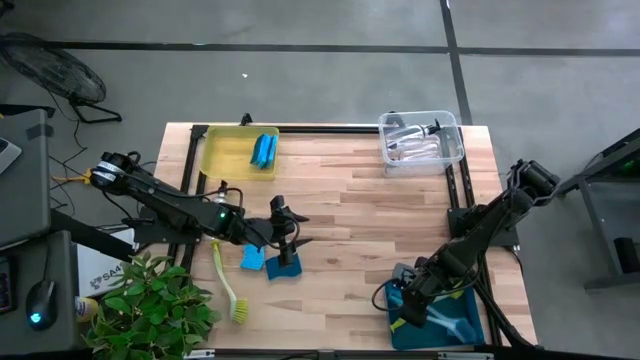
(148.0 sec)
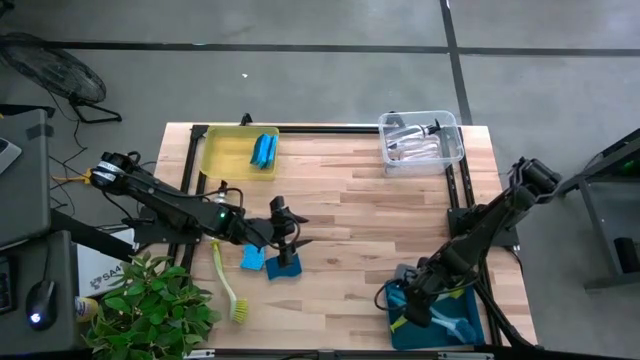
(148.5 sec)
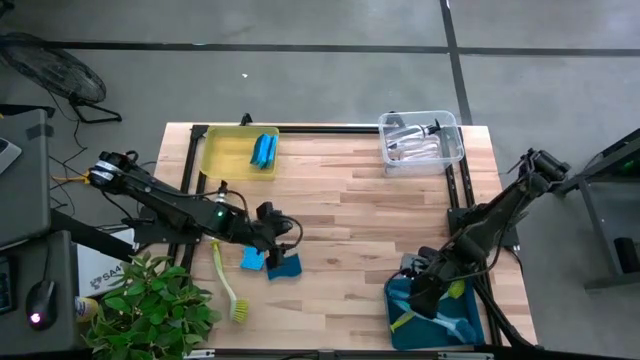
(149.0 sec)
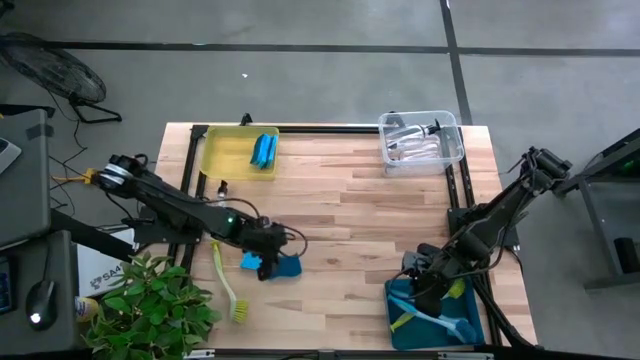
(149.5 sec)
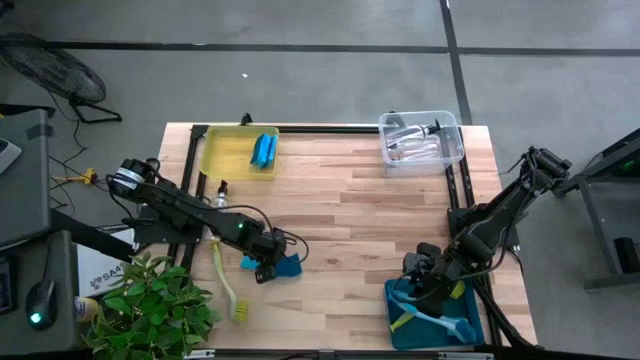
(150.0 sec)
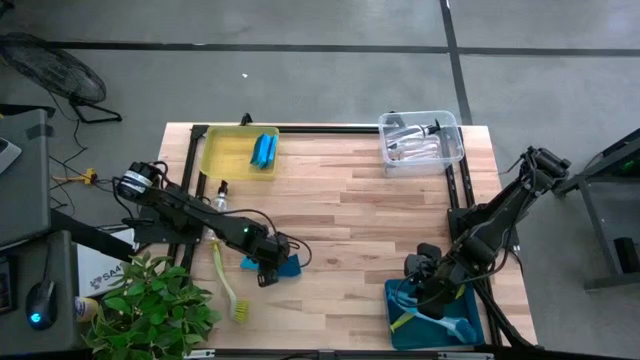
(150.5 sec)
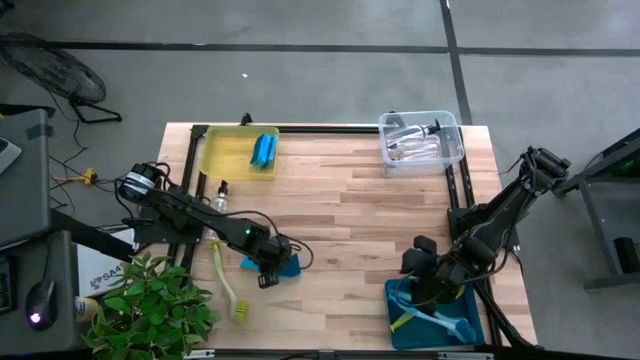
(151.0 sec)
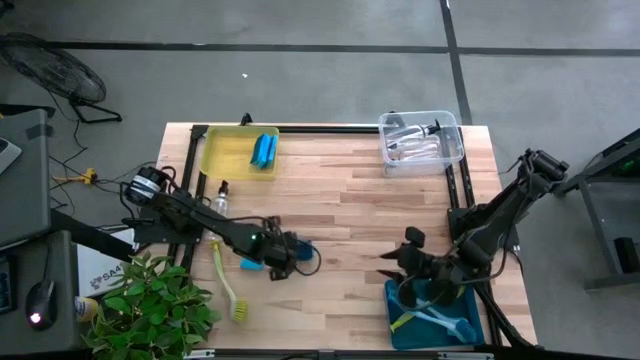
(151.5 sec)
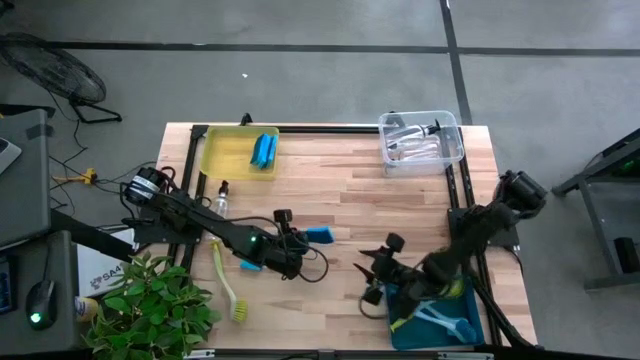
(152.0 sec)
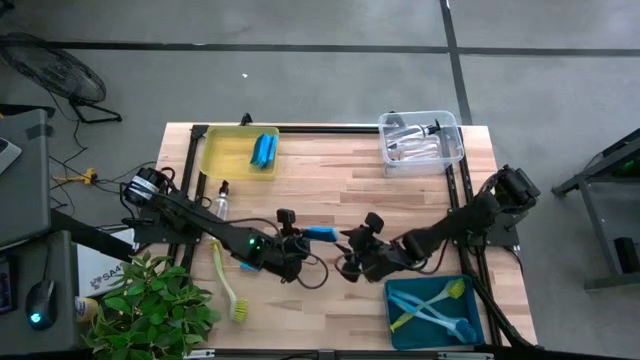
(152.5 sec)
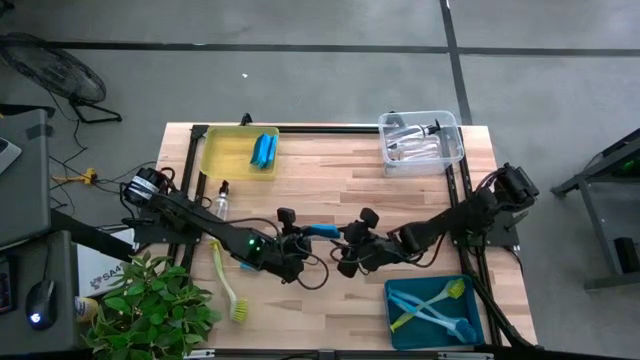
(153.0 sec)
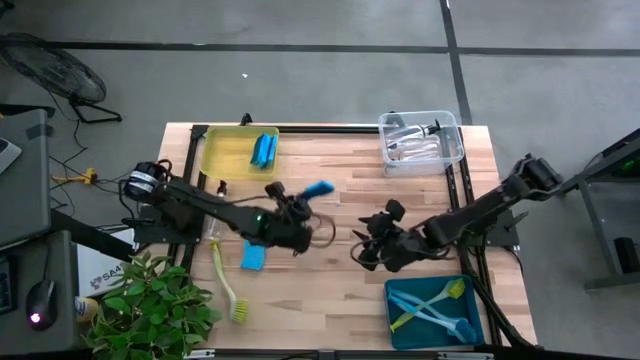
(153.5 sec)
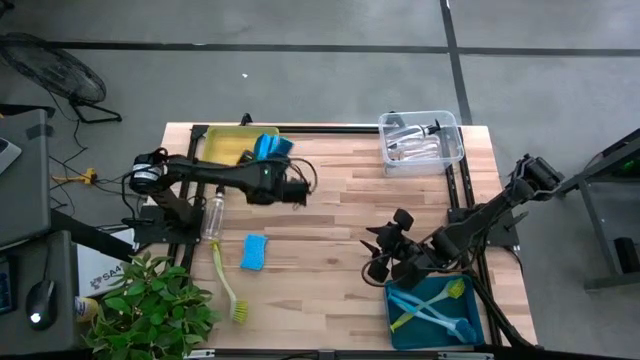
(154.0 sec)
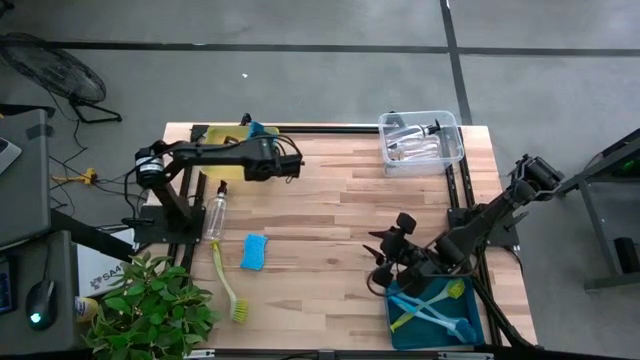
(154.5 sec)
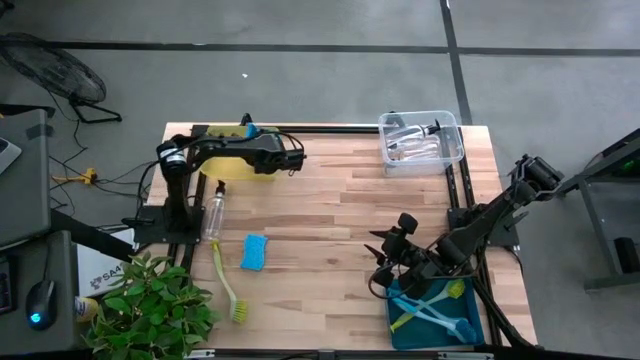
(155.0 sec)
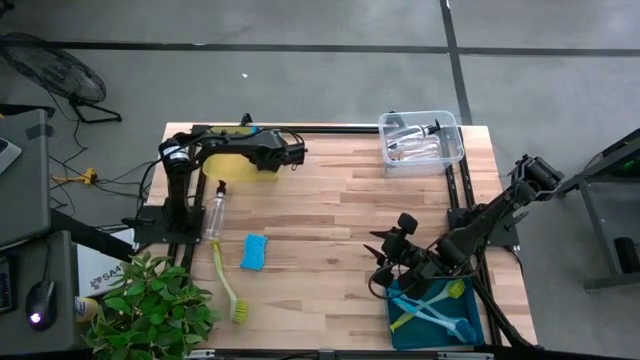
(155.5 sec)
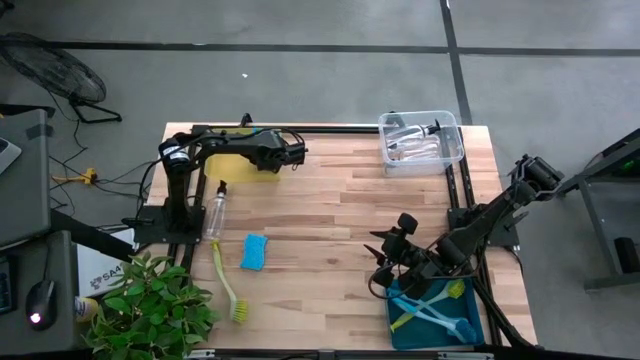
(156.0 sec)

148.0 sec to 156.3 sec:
Task: Pick & Place Kitchen Sink Supplies
Put the blue sponge into the yellow bin

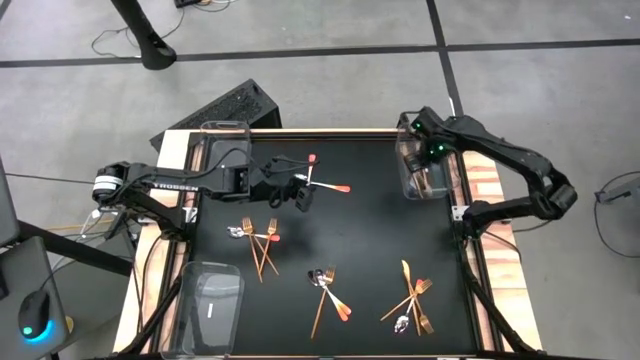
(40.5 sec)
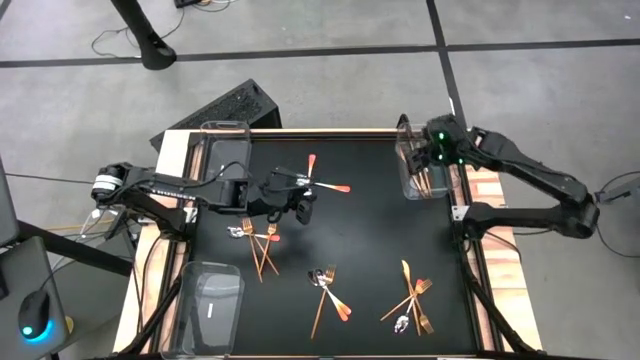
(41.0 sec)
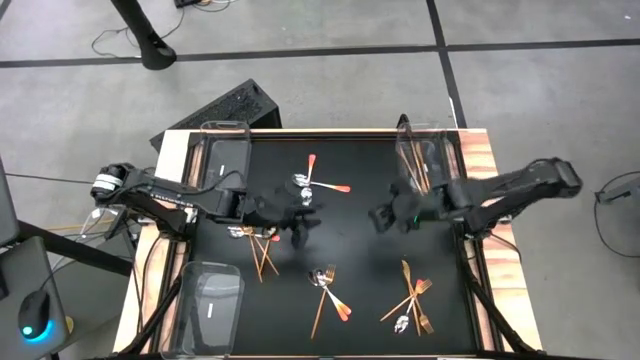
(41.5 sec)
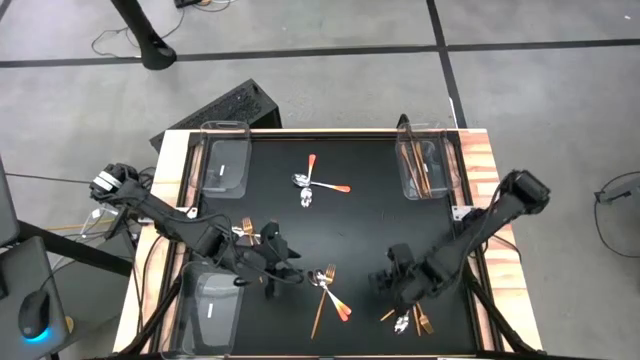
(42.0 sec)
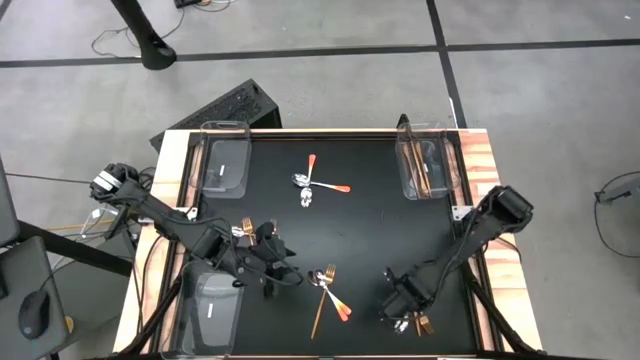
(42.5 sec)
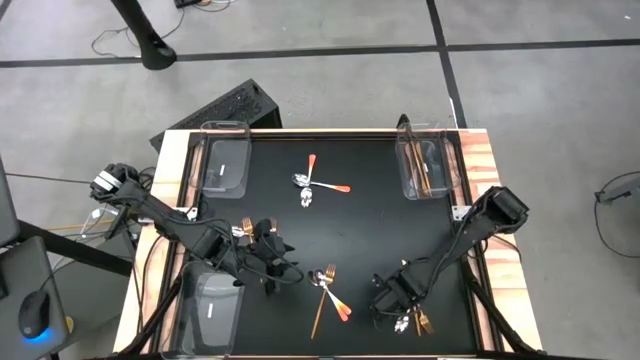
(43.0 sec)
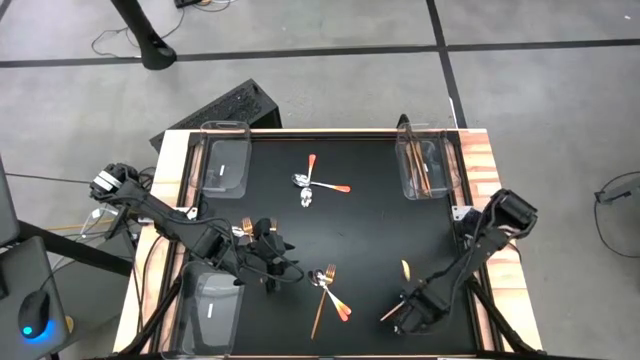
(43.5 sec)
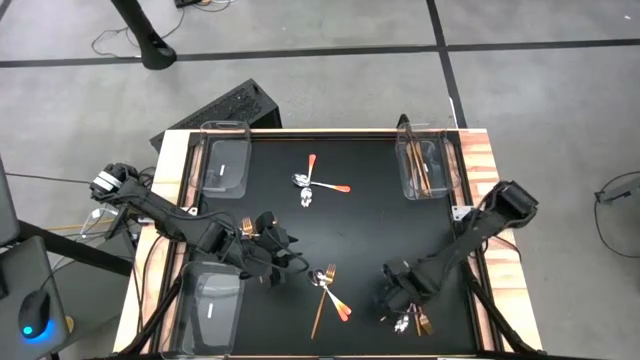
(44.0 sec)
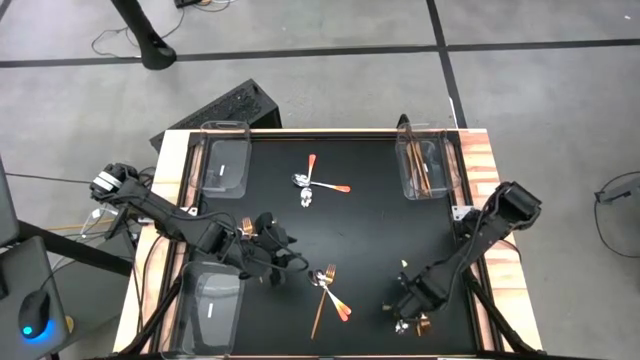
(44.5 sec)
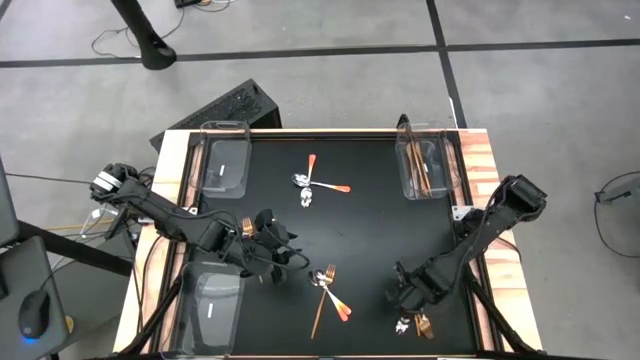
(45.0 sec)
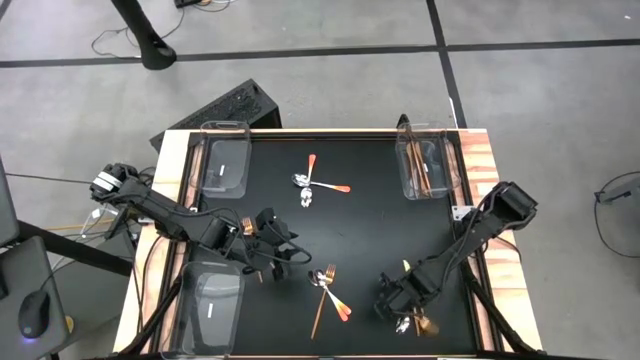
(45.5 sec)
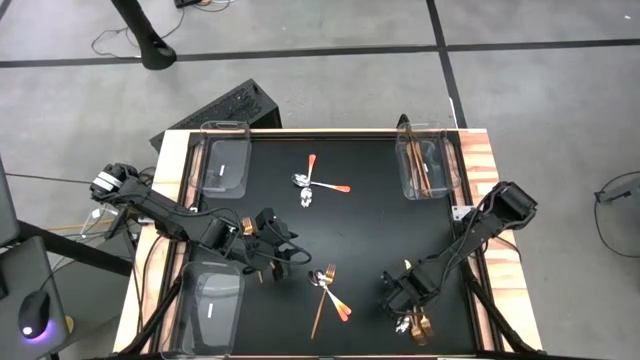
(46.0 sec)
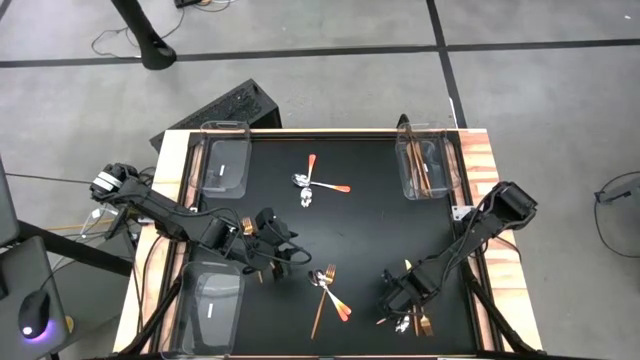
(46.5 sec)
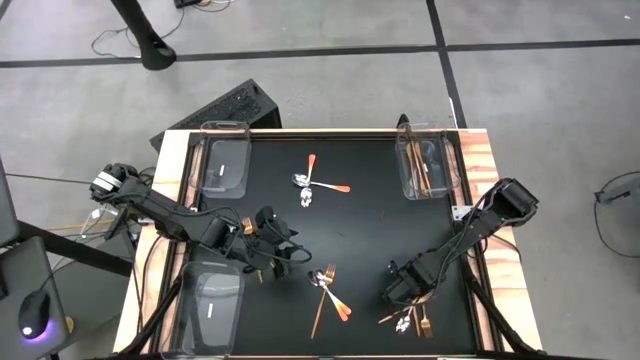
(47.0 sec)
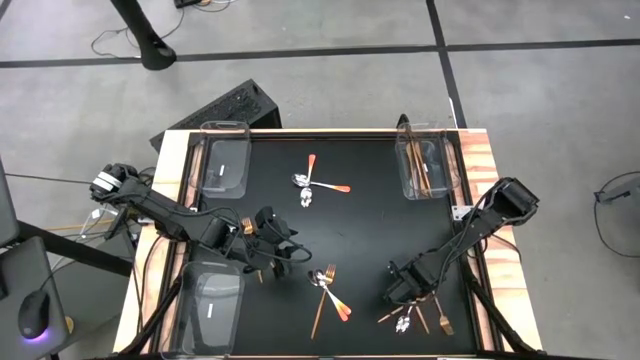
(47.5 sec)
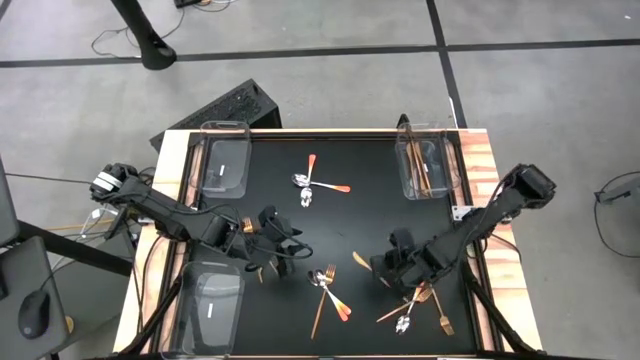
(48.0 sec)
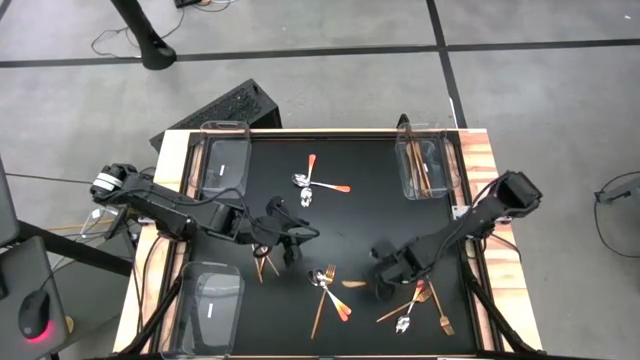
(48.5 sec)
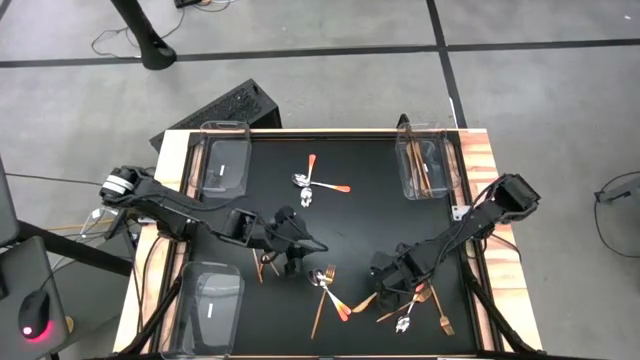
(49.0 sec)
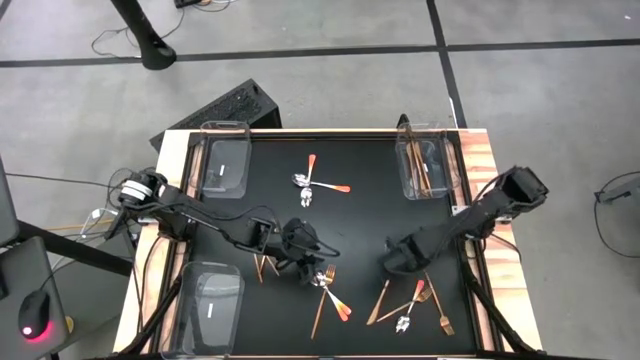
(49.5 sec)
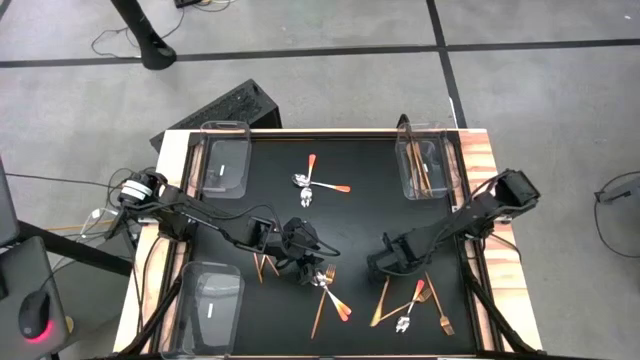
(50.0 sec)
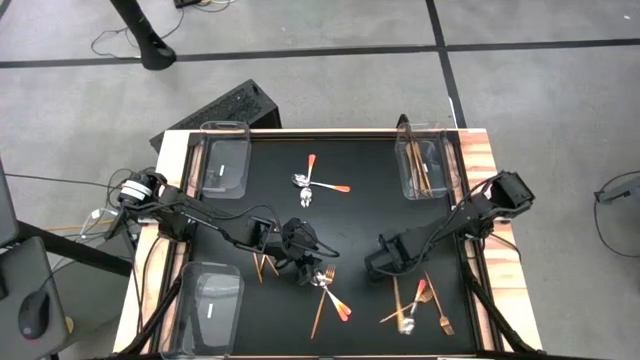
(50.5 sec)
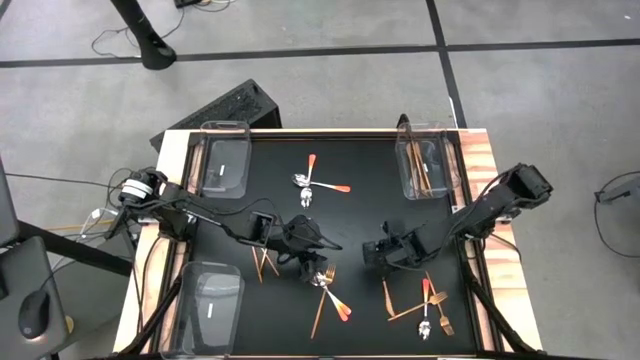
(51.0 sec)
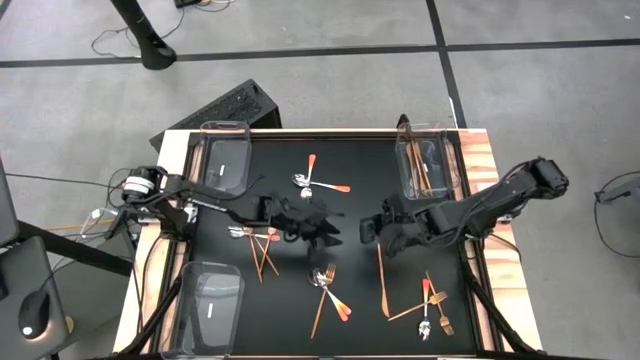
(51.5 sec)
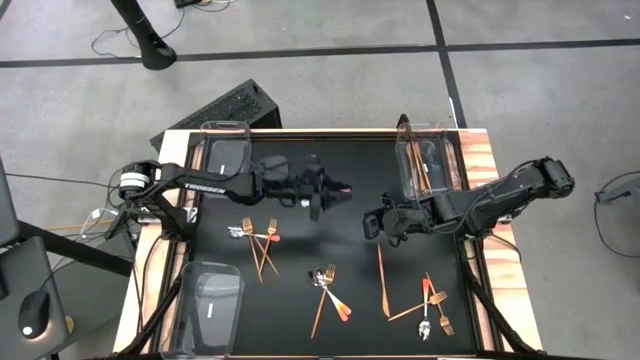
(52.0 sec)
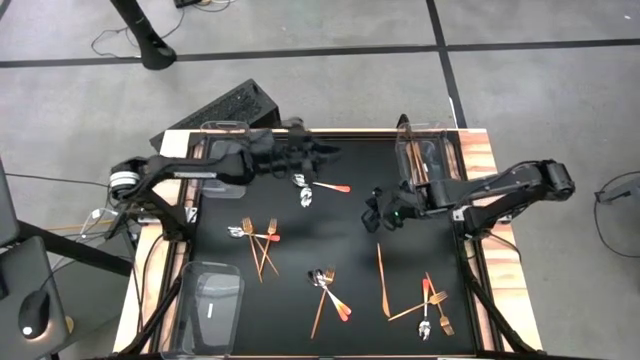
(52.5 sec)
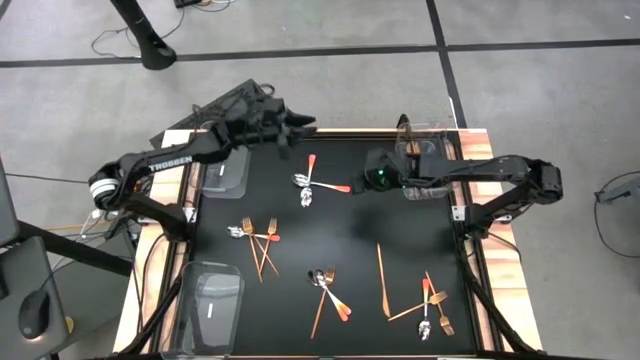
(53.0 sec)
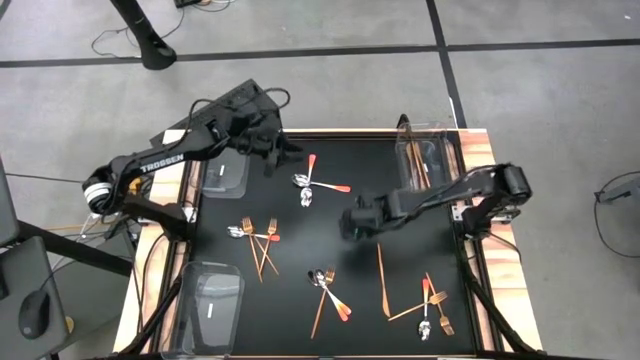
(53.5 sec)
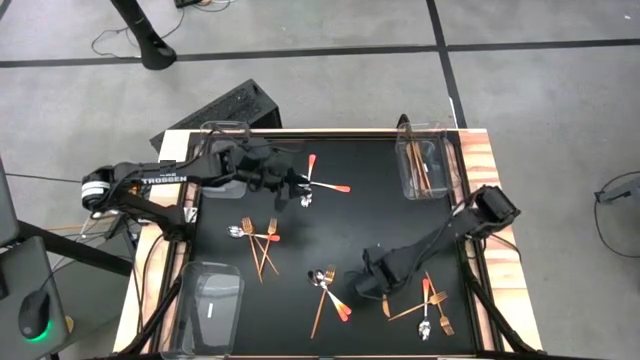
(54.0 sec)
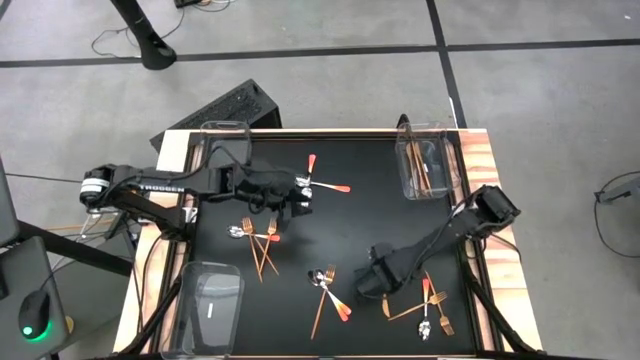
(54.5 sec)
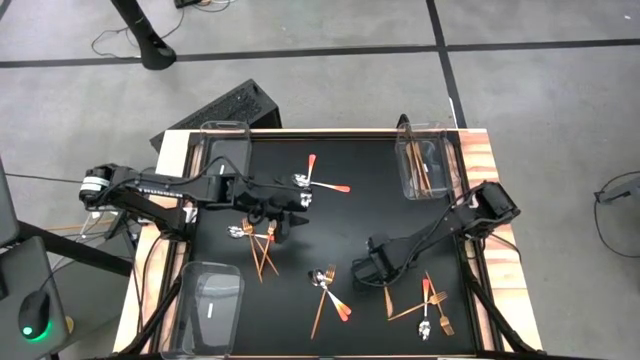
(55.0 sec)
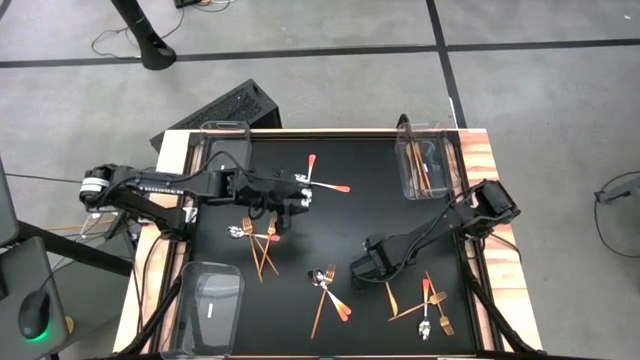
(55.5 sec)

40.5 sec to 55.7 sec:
Task: Sort silverware by color (type)
Put the gold table knife into the top right transparent bin
